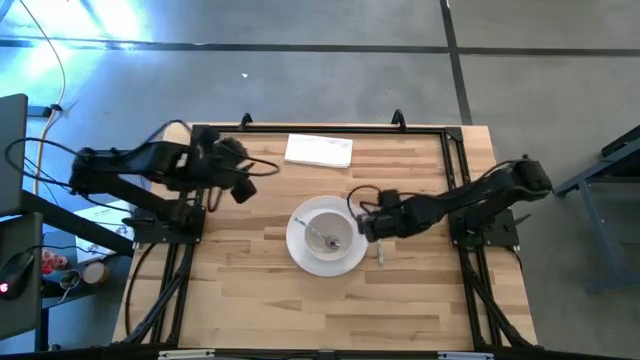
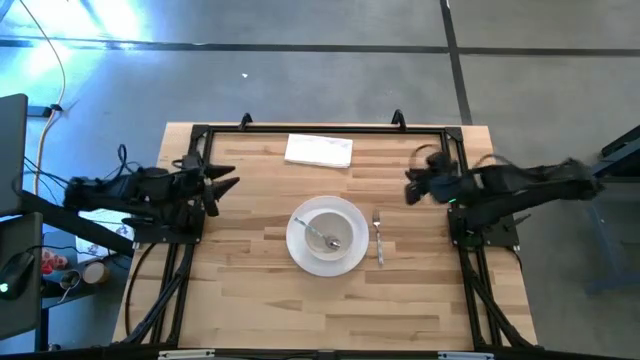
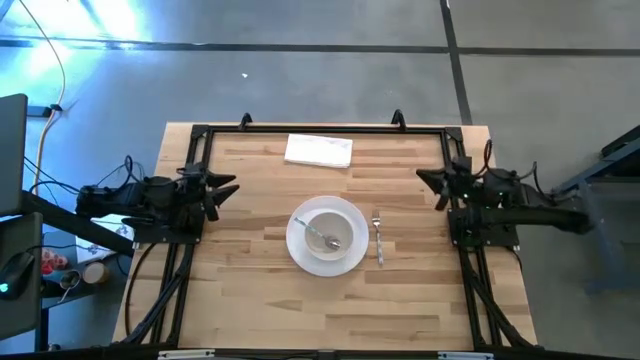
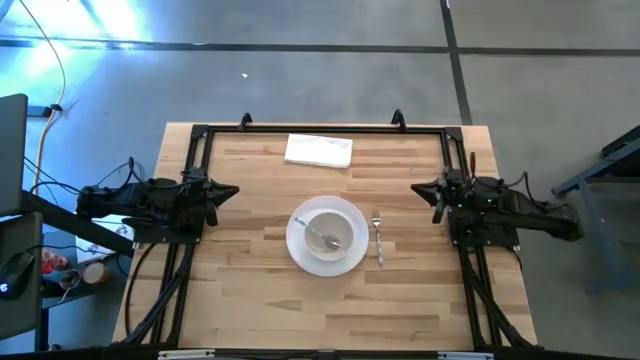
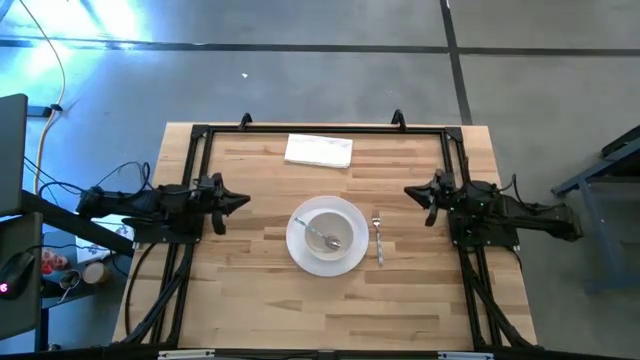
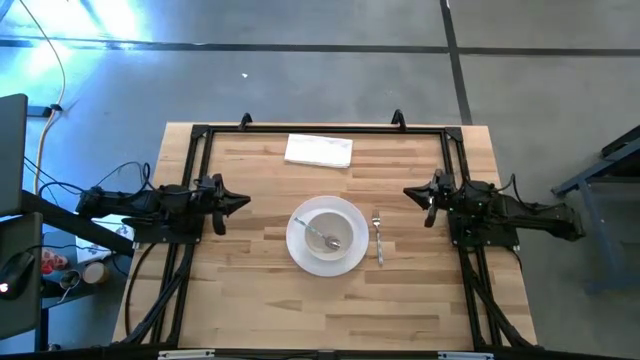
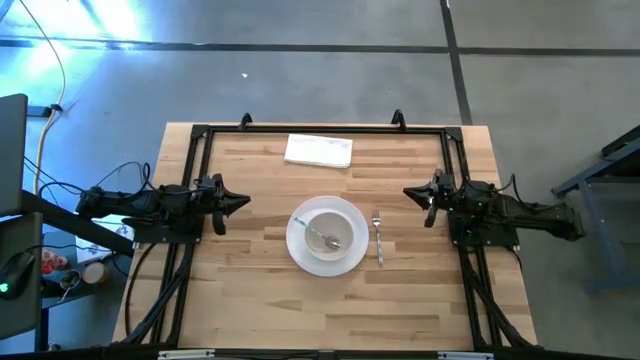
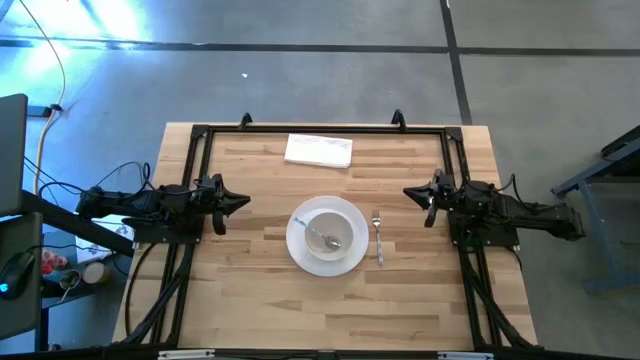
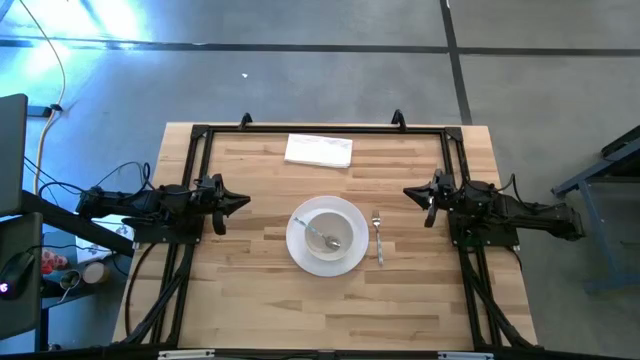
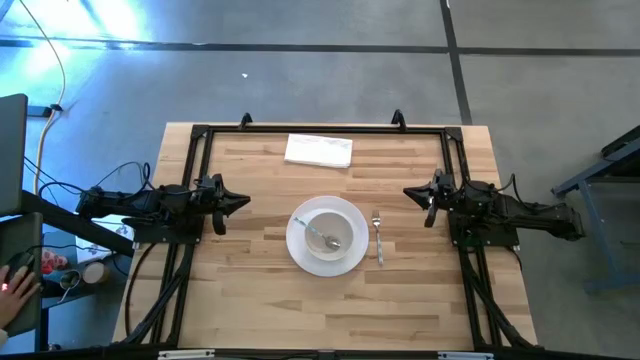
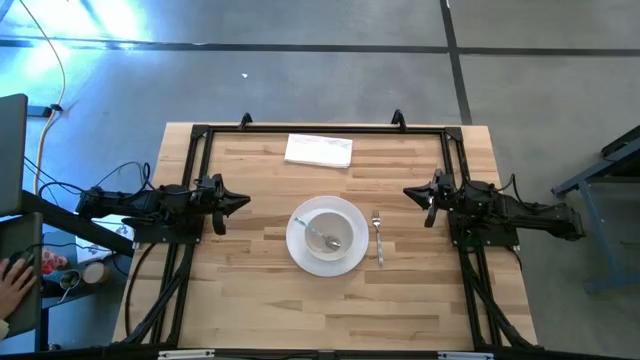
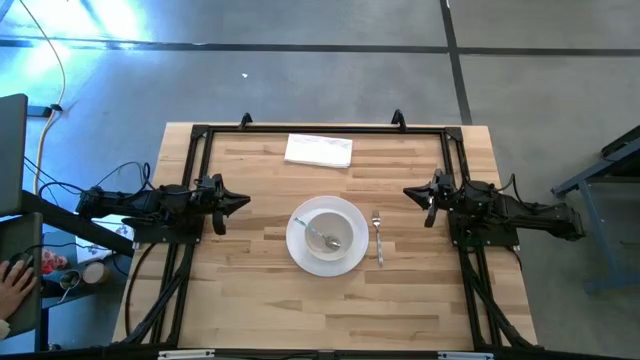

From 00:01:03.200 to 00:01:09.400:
Task: Set table place
Return to Home Position

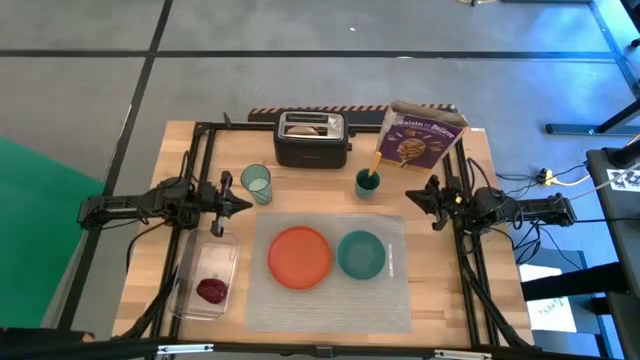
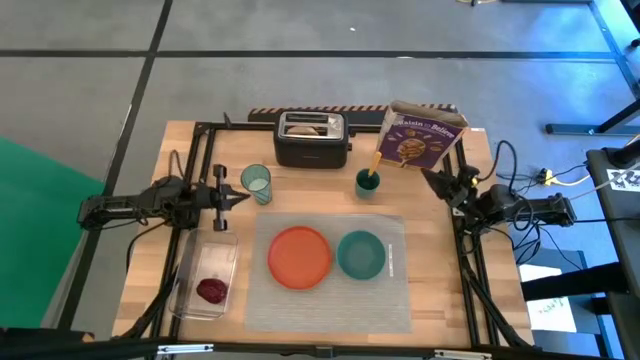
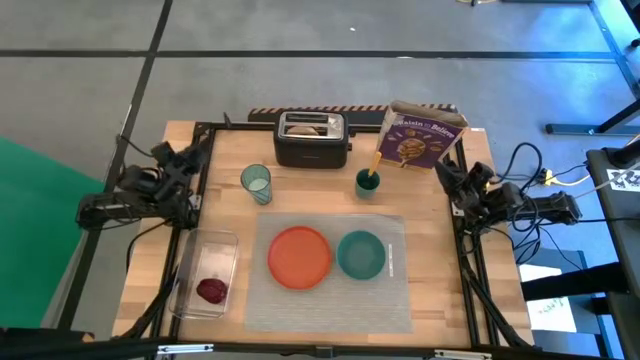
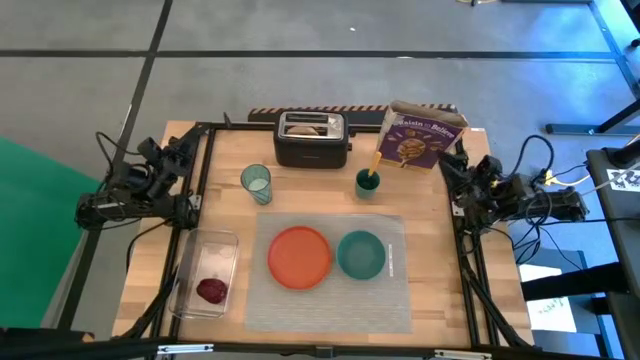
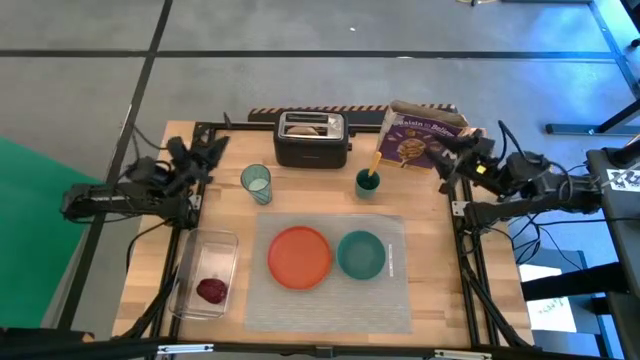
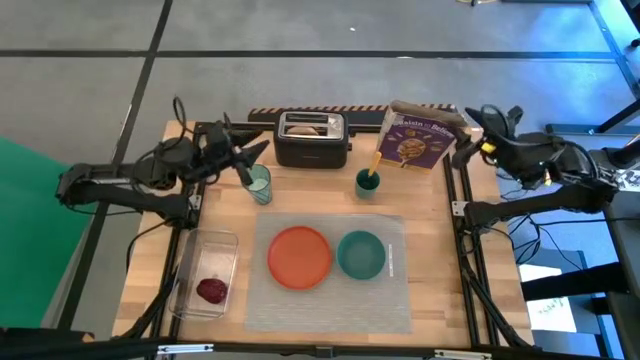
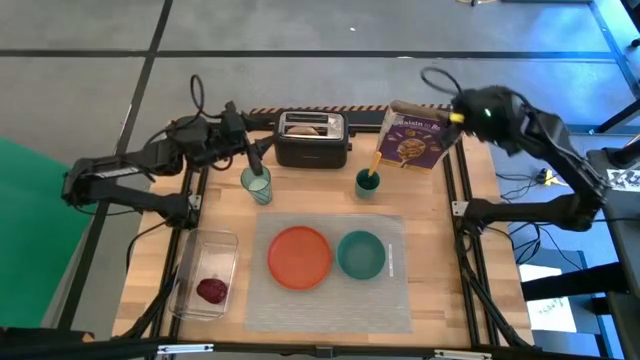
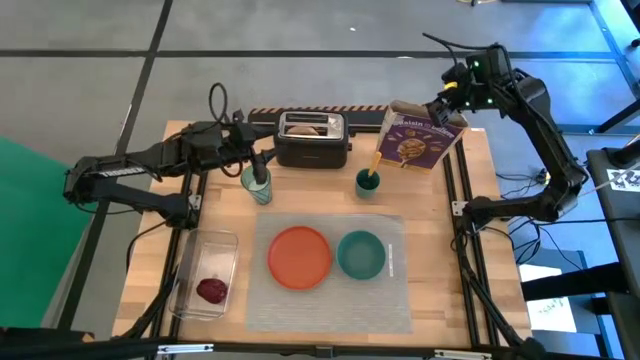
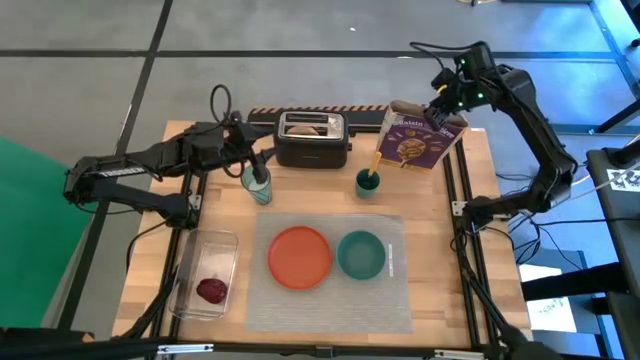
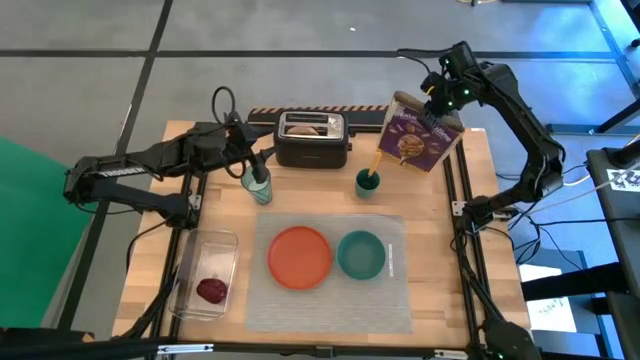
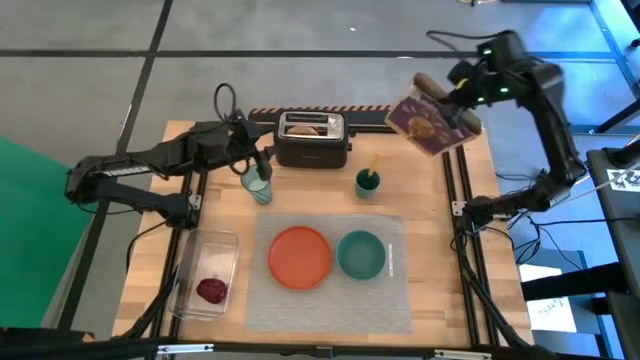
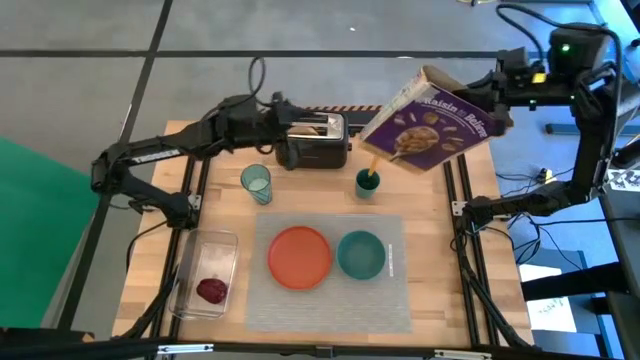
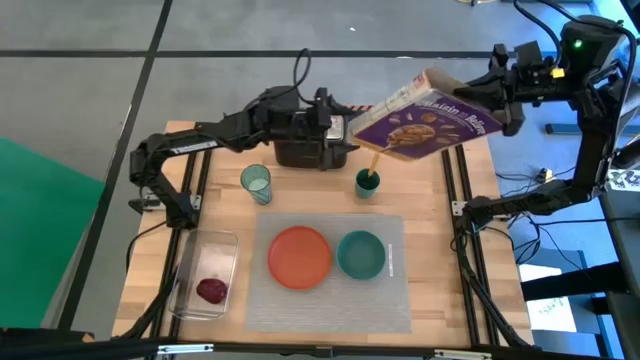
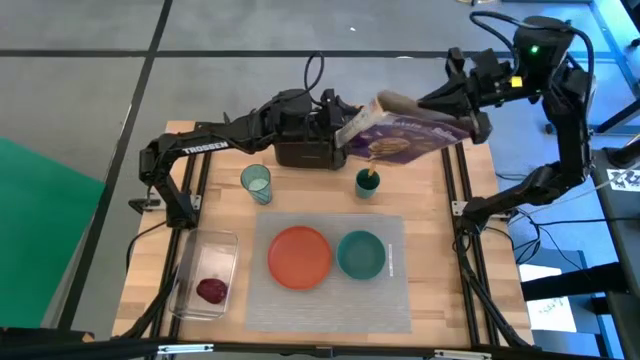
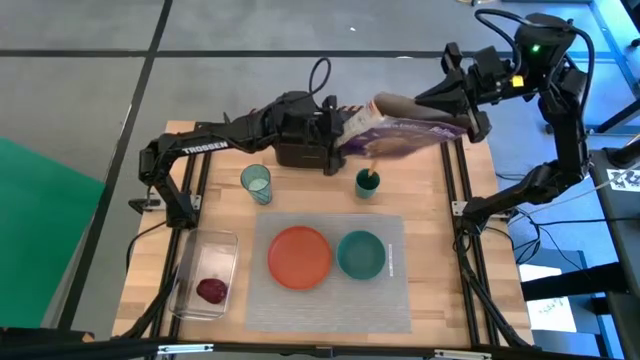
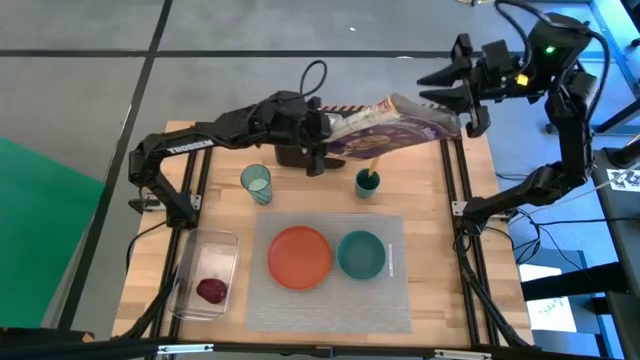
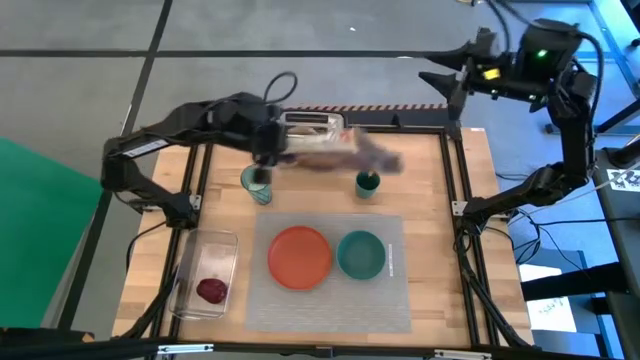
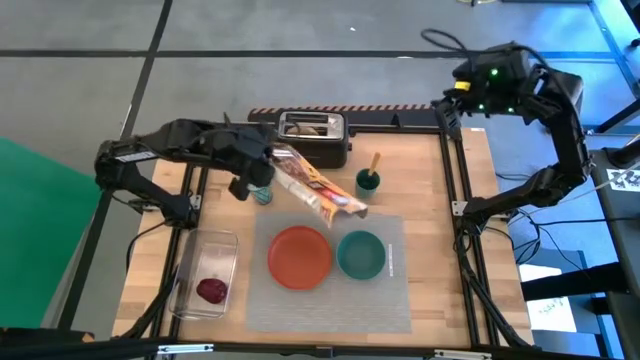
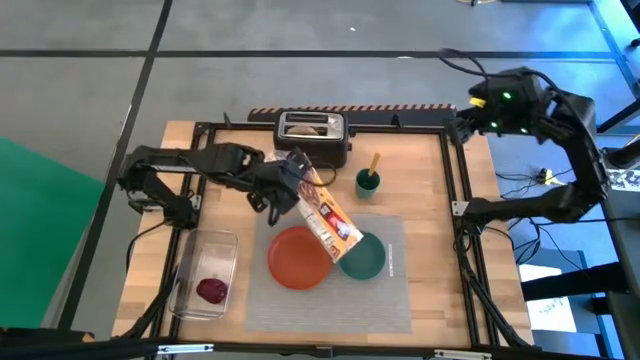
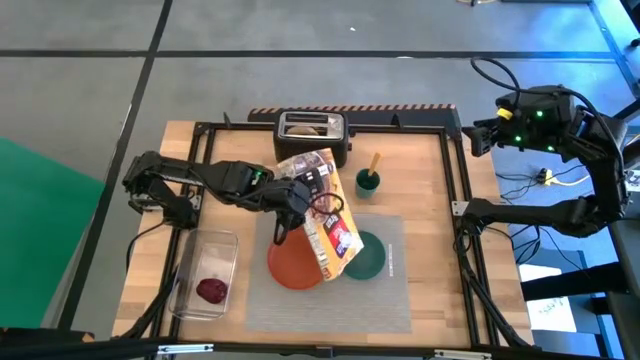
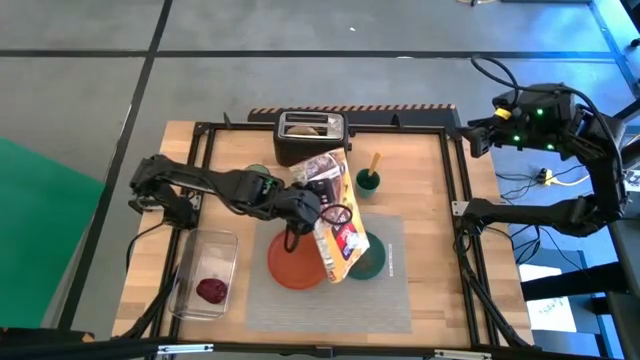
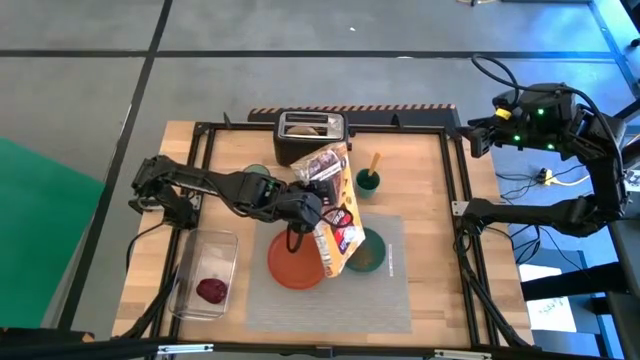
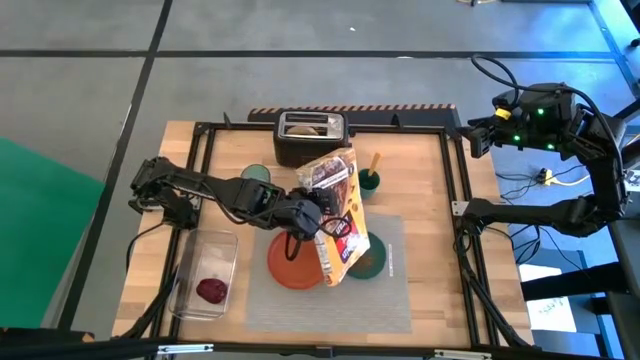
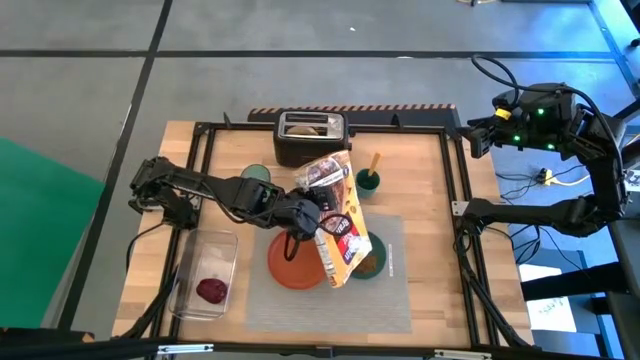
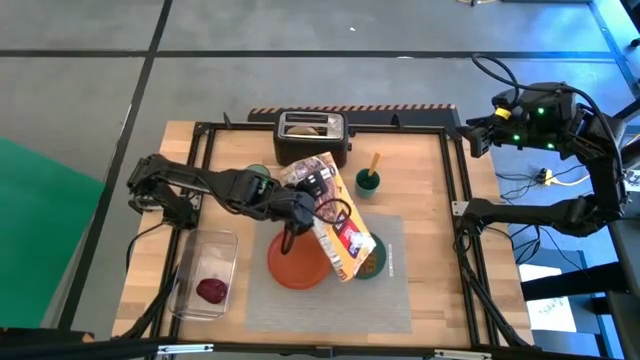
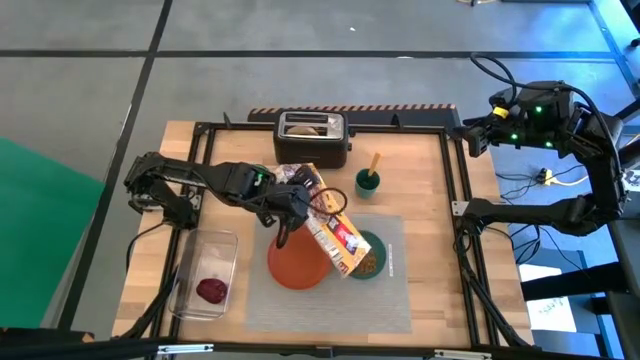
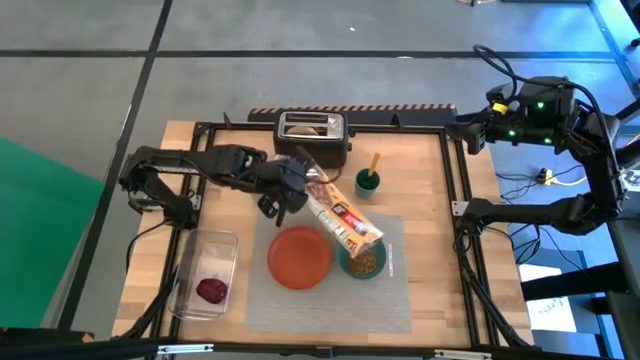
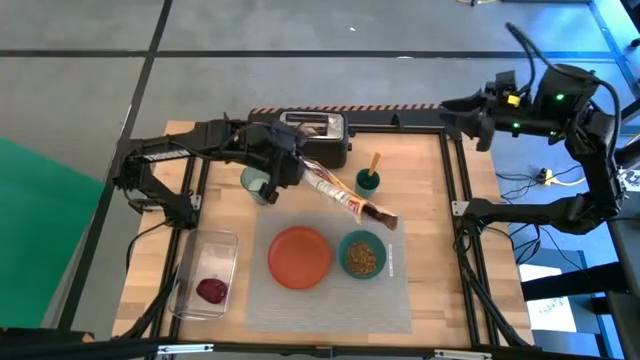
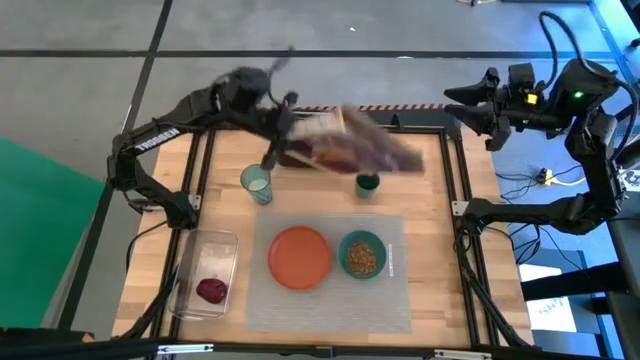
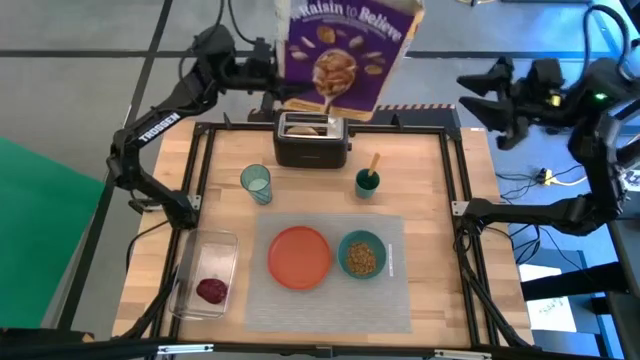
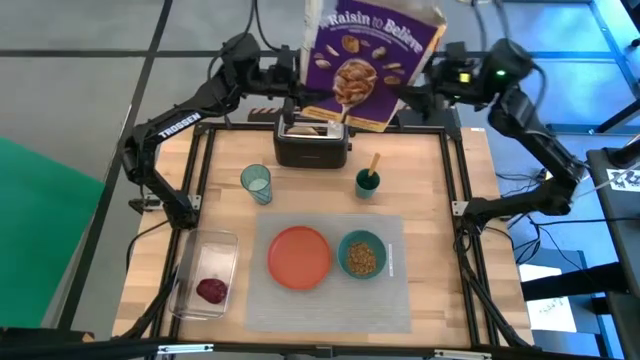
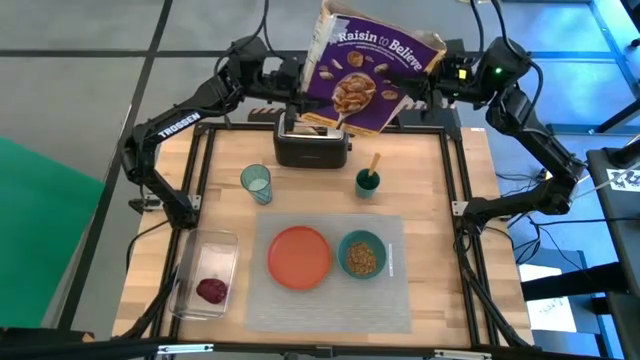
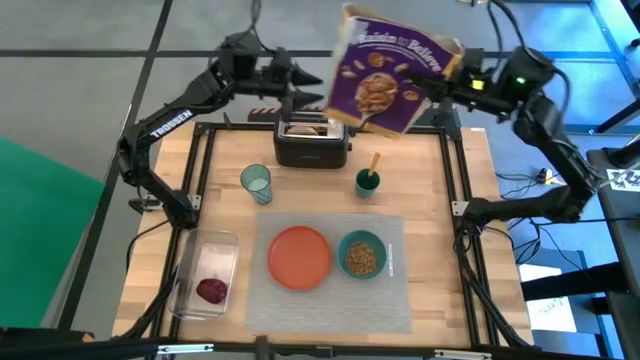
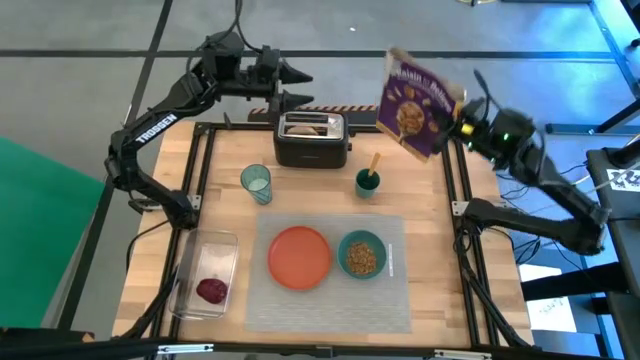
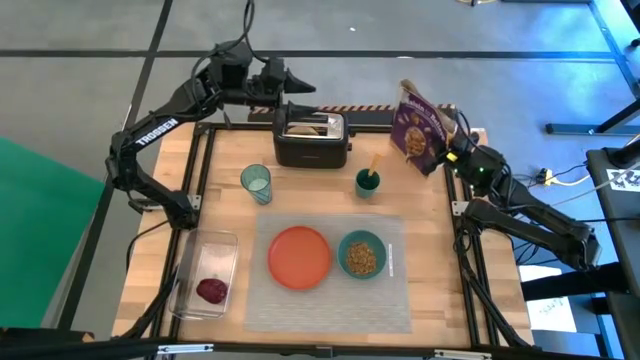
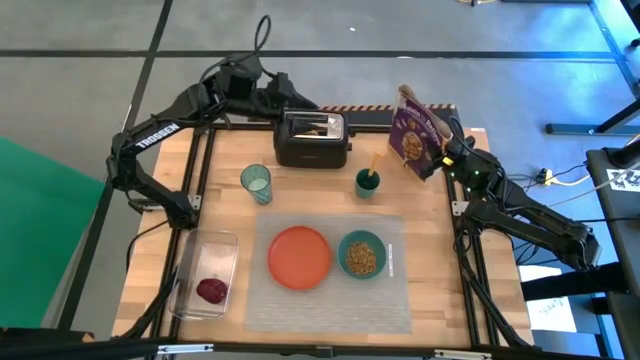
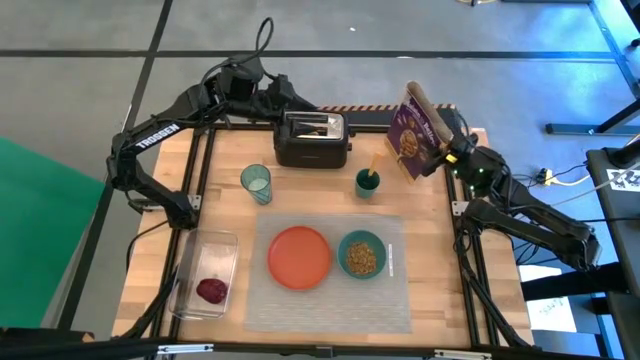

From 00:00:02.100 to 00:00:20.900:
Task: Arrange a breakfast setting
Pour the cereal from the violet cereal box into the green bowl
